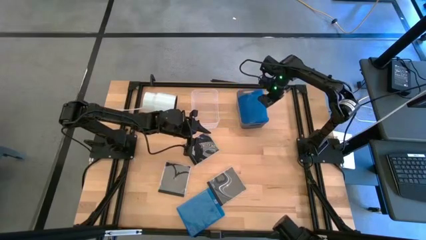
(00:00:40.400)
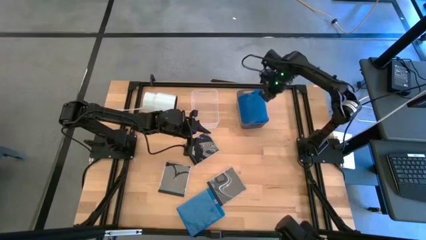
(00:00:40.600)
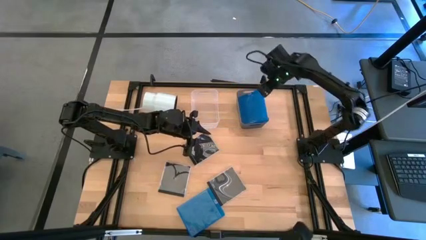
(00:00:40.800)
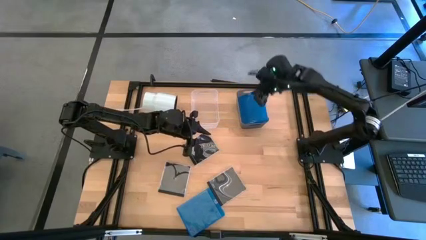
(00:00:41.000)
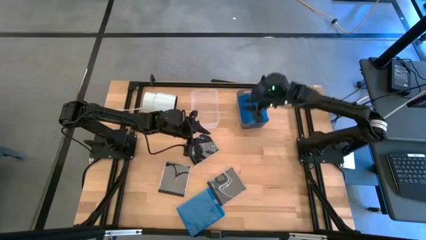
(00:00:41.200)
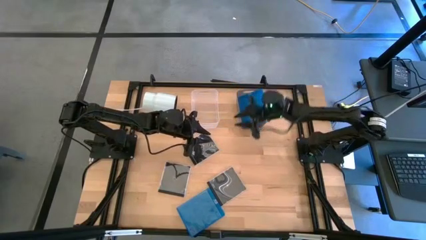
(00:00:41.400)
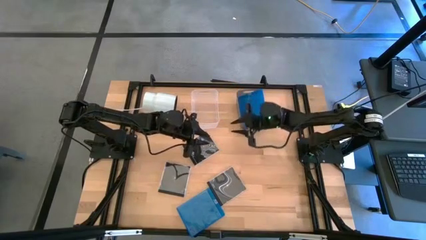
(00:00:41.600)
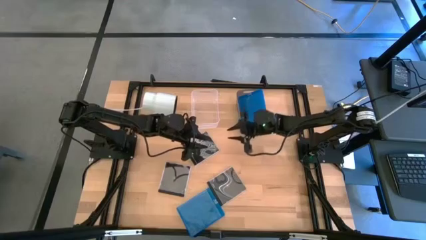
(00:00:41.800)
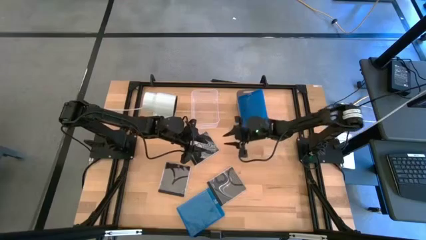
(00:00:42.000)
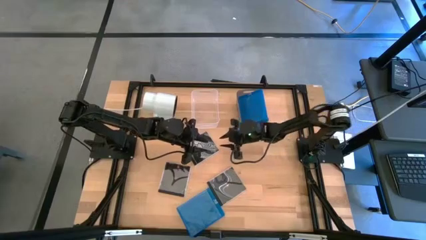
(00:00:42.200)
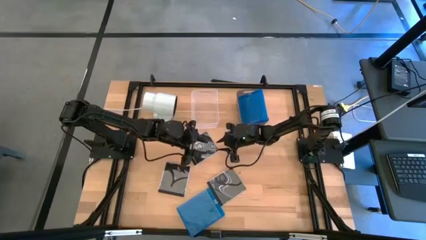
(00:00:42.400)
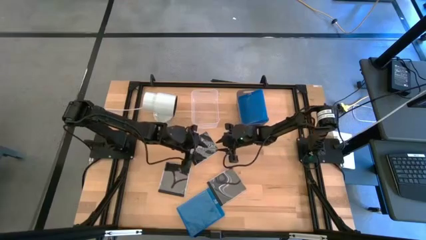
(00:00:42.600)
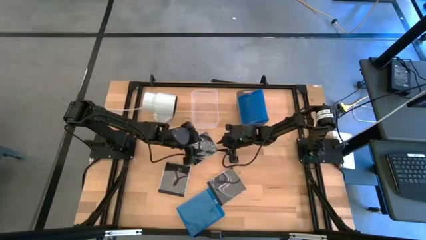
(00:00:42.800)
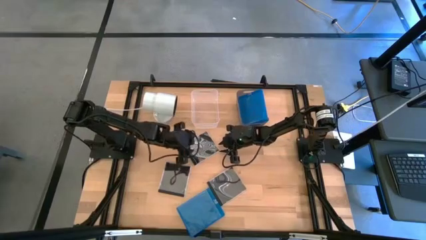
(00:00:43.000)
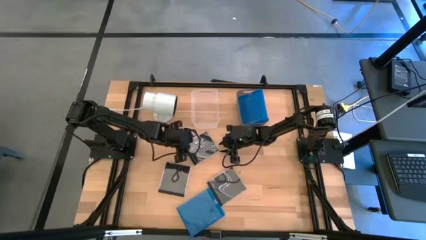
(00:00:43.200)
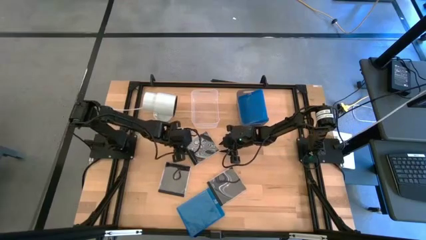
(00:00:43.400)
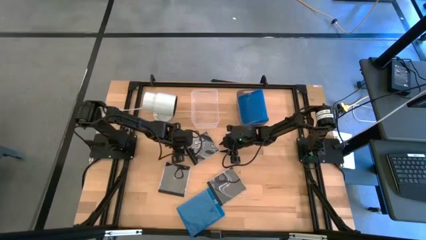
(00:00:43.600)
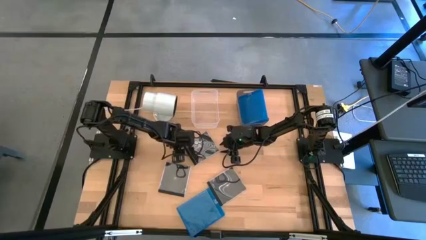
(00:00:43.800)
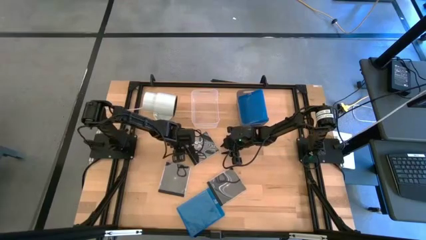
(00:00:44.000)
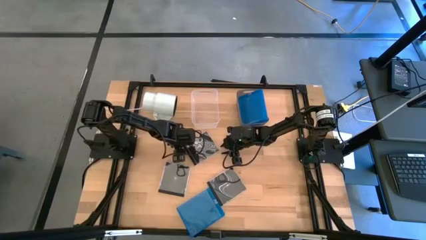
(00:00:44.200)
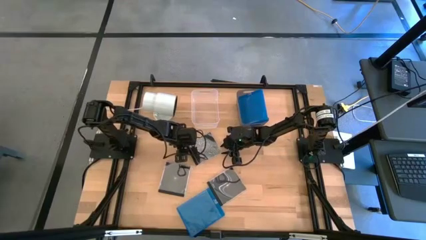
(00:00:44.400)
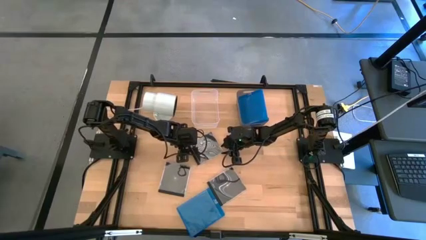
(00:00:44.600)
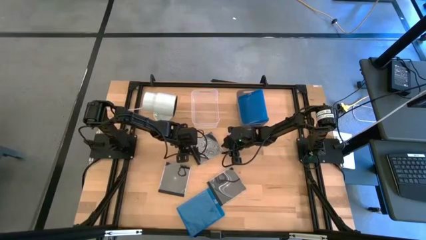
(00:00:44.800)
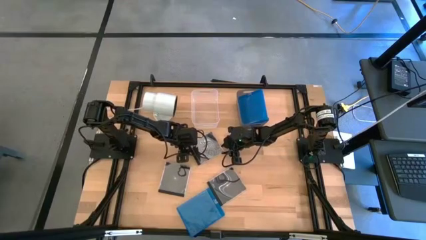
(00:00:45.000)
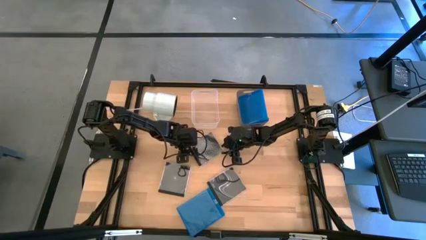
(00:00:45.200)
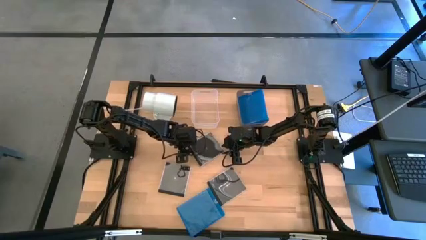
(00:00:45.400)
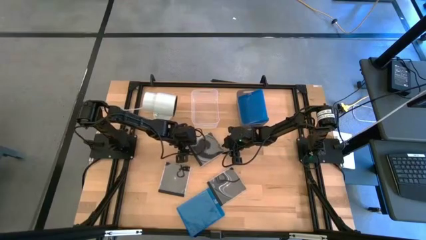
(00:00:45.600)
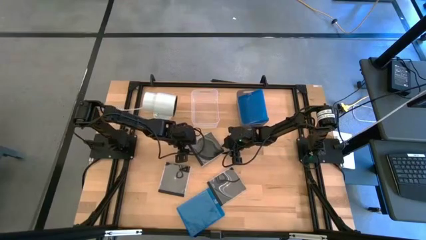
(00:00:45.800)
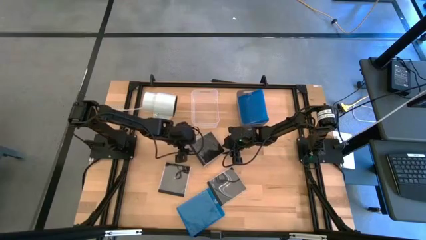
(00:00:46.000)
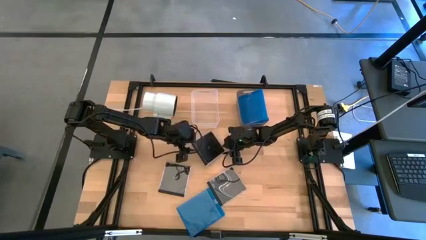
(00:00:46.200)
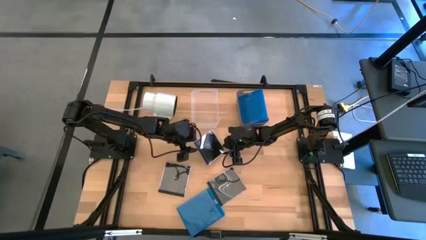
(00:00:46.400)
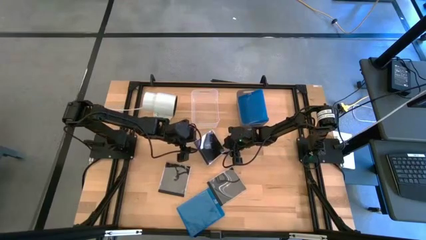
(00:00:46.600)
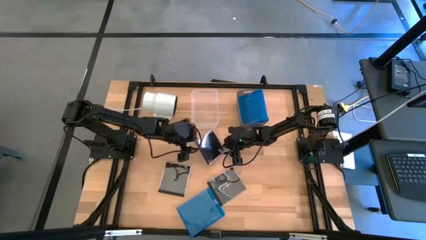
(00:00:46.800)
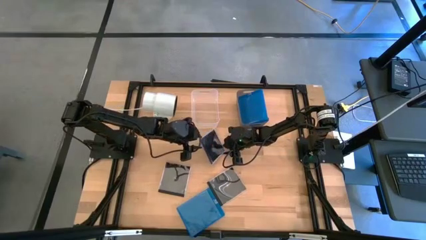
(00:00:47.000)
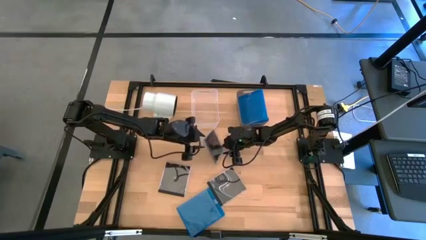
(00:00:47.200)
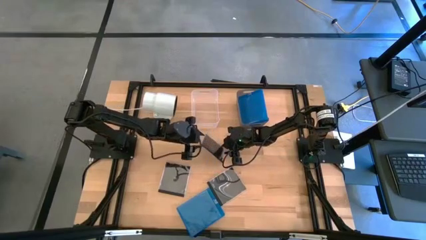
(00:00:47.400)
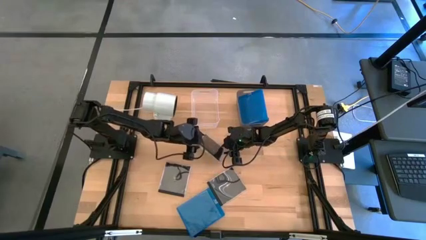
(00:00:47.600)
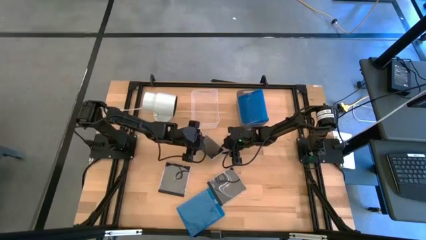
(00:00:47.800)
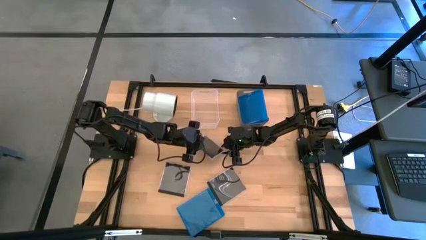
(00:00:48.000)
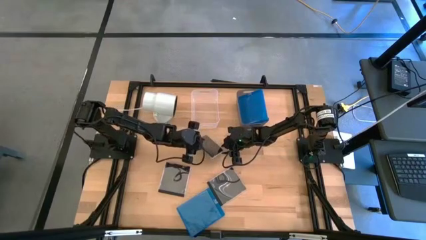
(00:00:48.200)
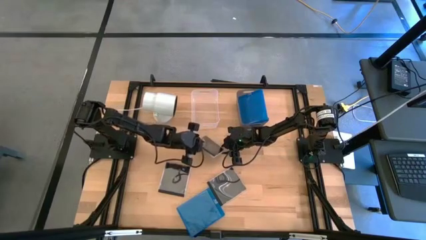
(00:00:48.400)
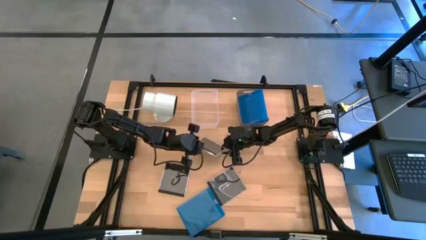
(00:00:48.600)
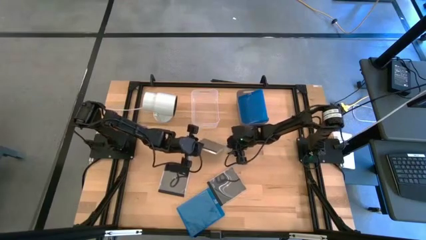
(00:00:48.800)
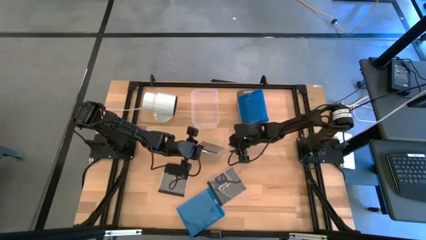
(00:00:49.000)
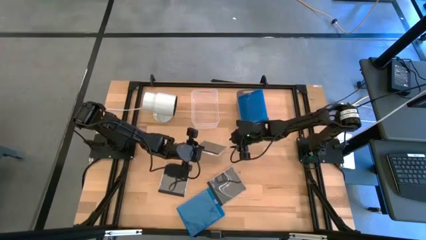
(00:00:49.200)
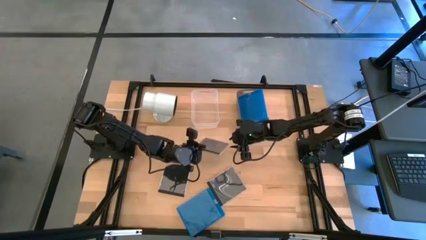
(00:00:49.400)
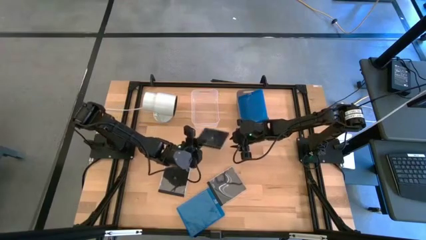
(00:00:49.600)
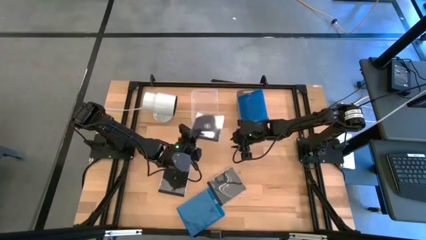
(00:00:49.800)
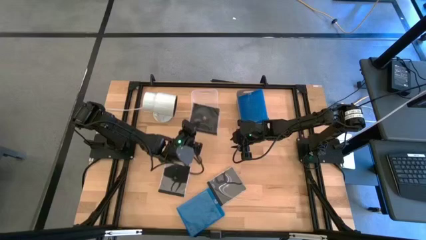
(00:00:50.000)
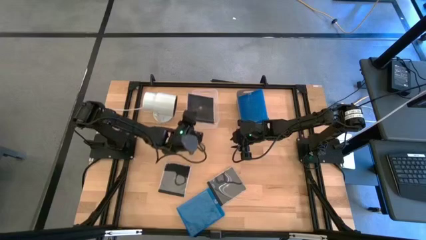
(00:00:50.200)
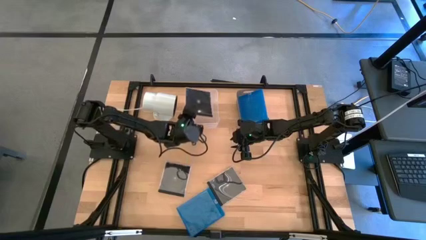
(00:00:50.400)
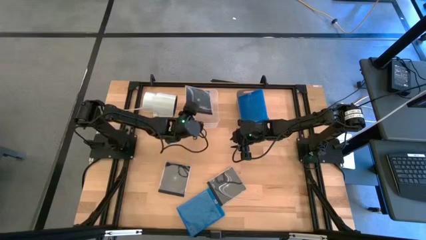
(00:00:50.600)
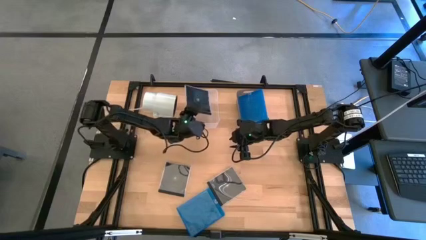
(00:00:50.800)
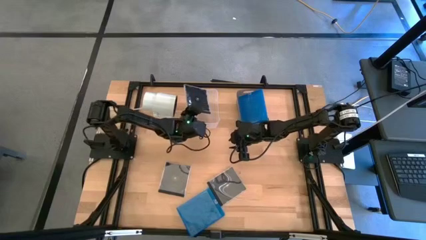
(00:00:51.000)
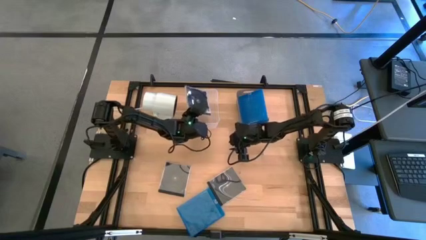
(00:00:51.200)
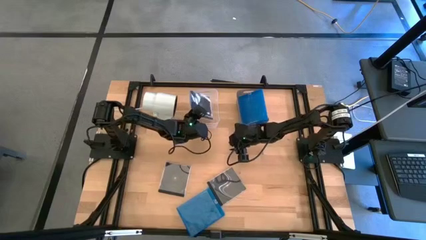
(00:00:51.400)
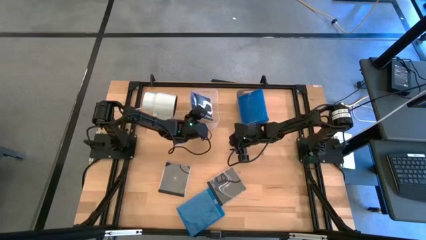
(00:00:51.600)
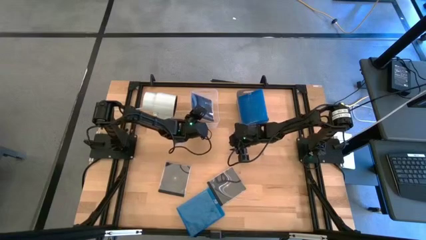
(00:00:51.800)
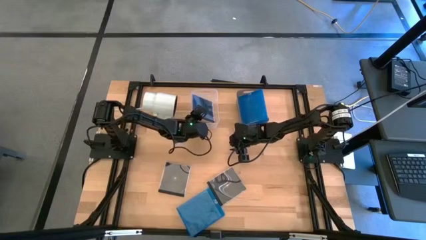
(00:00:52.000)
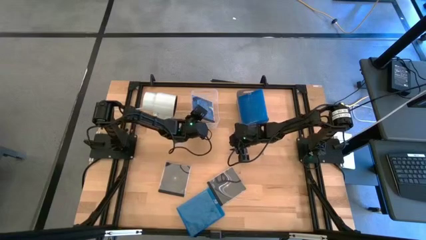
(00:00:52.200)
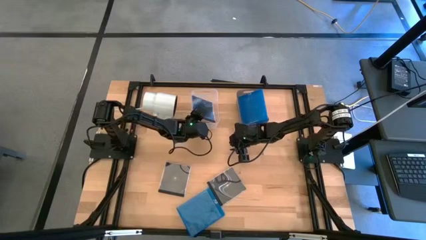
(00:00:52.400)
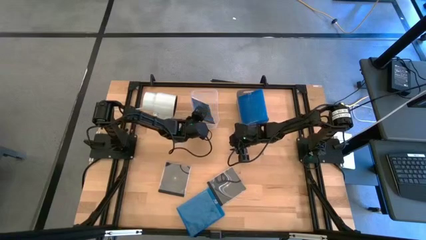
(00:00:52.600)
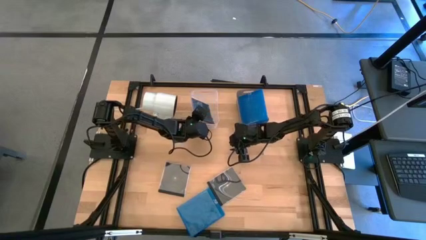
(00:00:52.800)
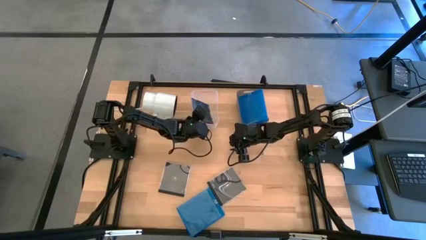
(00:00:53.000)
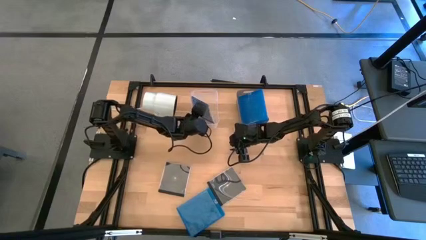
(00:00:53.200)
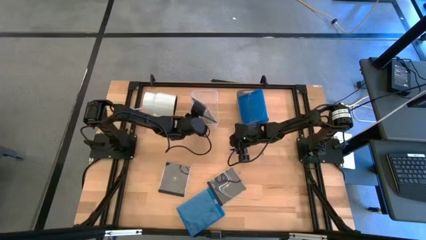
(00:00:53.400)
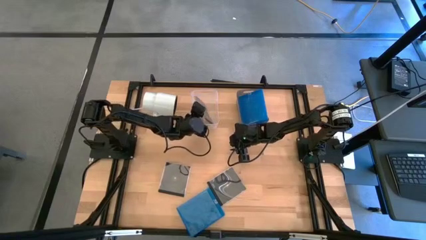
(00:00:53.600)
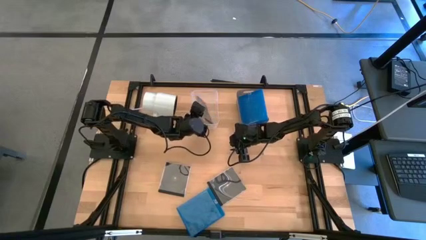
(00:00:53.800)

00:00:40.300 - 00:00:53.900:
Task: Pick & place jewel cases by type
Put the top black cd case into the white bin

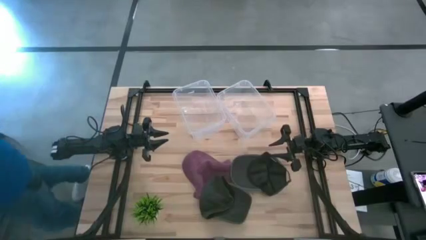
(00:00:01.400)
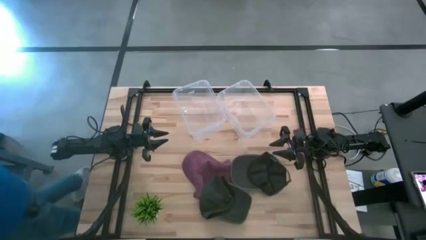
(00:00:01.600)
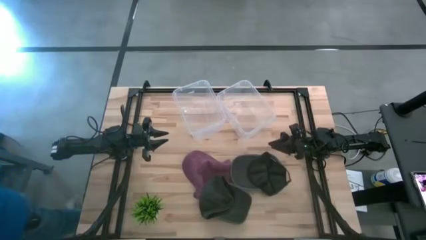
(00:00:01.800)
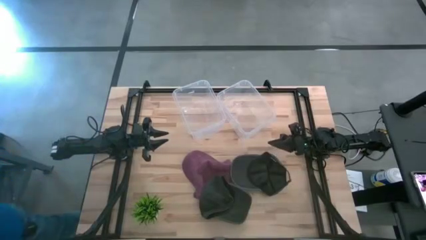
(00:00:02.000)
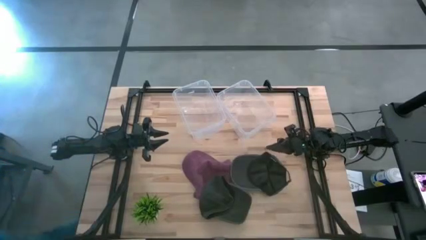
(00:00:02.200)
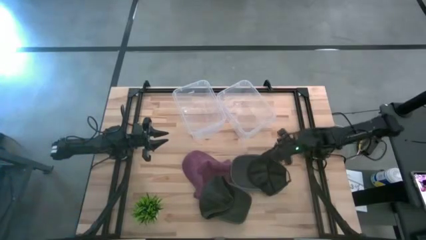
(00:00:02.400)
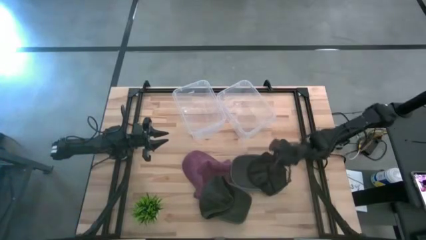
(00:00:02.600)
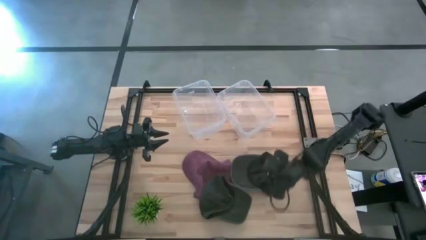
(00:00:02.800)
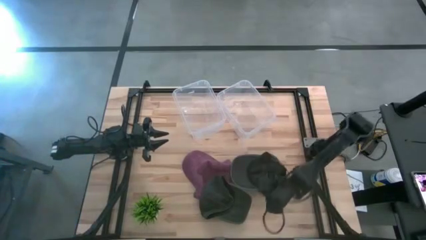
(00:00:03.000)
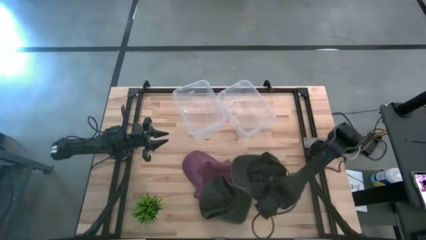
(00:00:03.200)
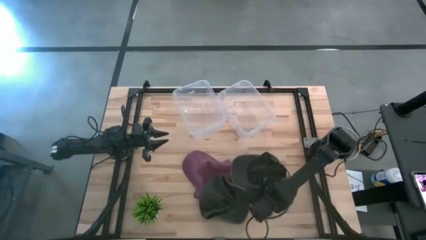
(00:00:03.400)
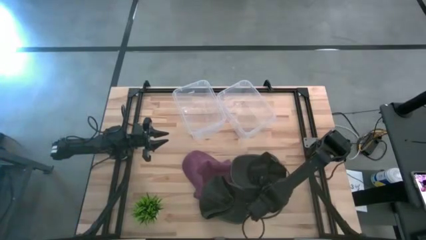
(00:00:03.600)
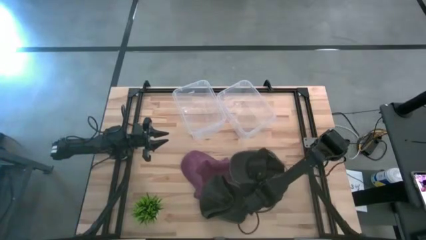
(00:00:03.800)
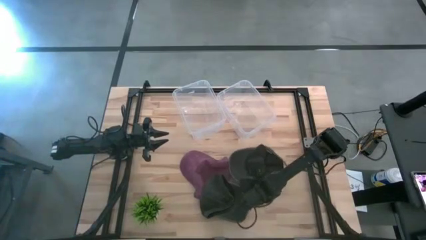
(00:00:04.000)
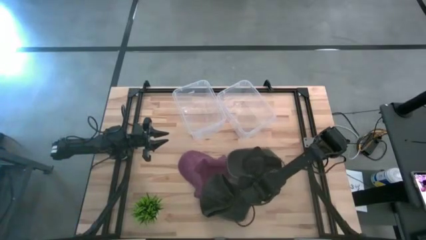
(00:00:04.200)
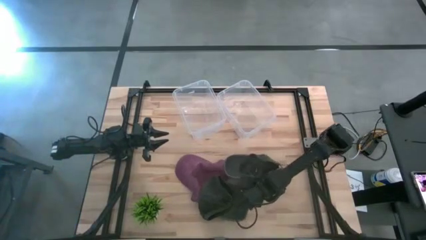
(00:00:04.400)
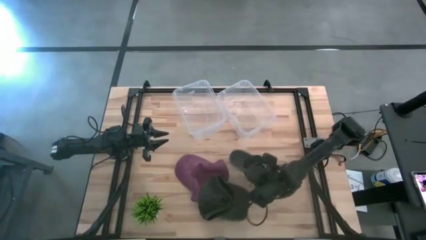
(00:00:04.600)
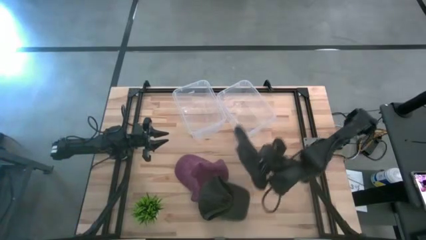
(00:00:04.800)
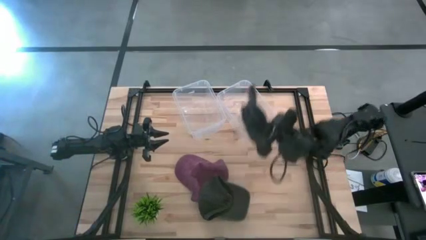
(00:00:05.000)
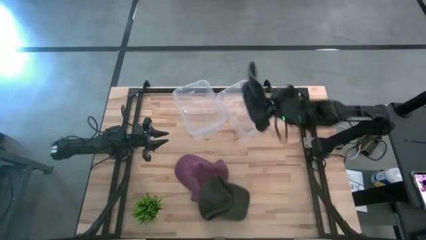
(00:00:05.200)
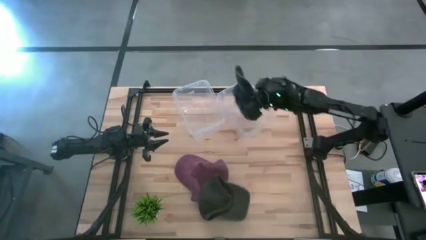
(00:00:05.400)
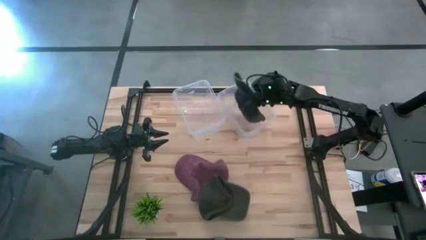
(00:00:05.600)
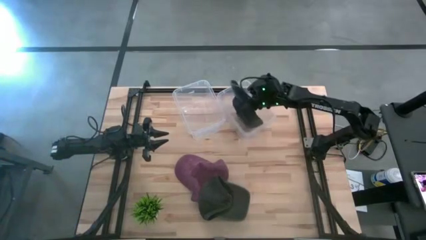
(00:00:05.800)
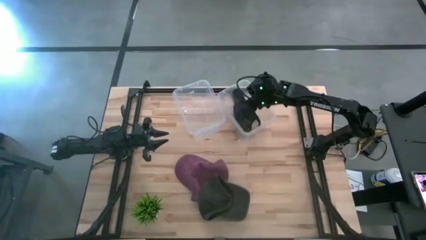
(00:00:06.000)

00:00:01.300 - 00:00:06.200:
Task: Pick & Place hat
Put the right black cap into the right transparent bin
